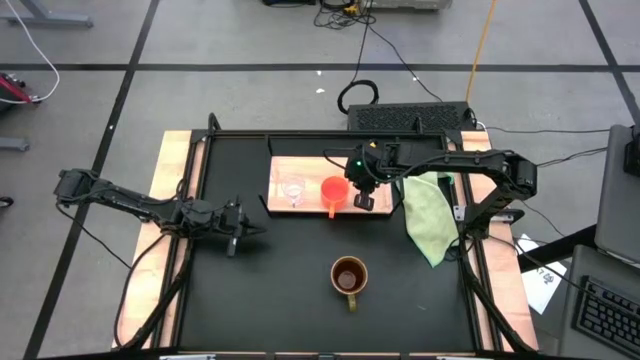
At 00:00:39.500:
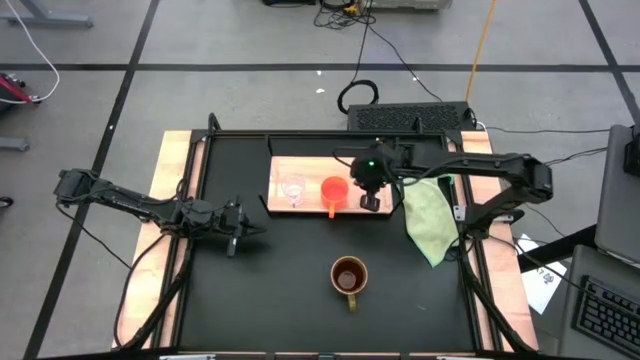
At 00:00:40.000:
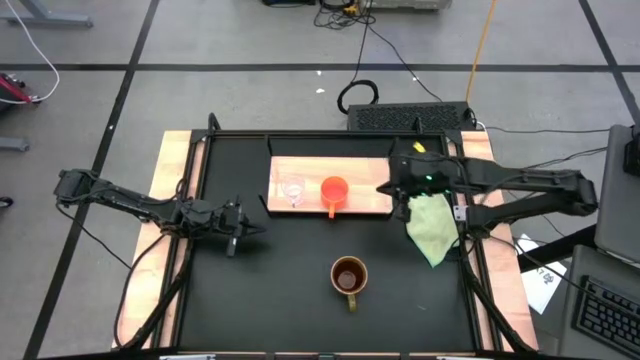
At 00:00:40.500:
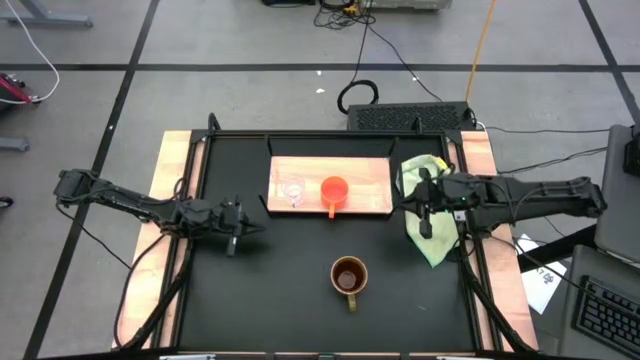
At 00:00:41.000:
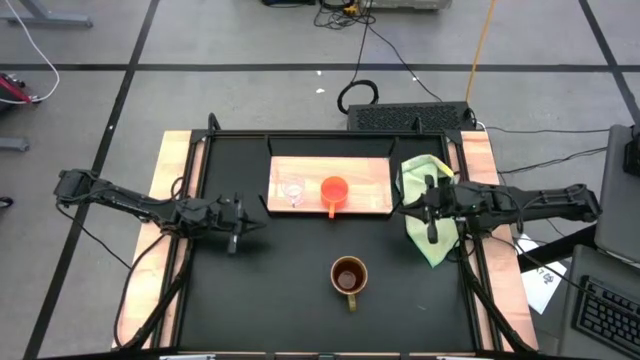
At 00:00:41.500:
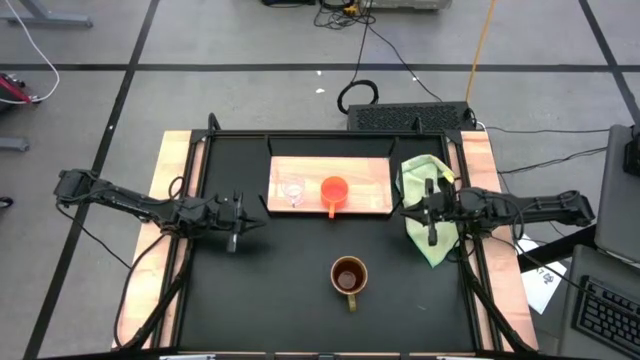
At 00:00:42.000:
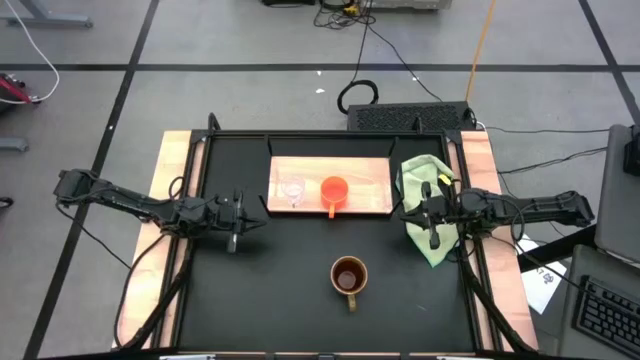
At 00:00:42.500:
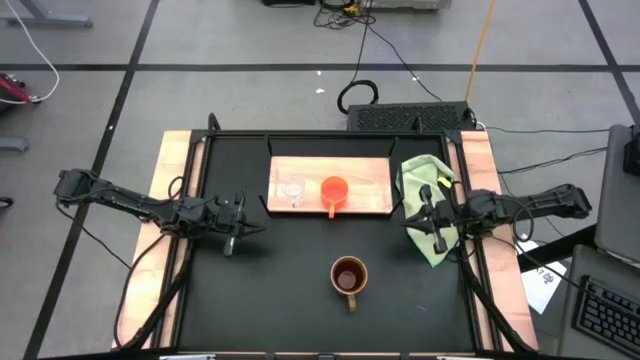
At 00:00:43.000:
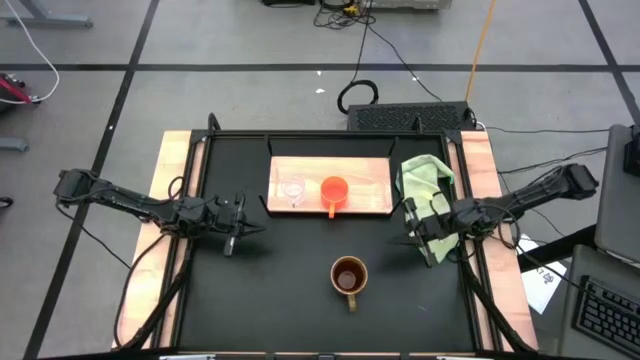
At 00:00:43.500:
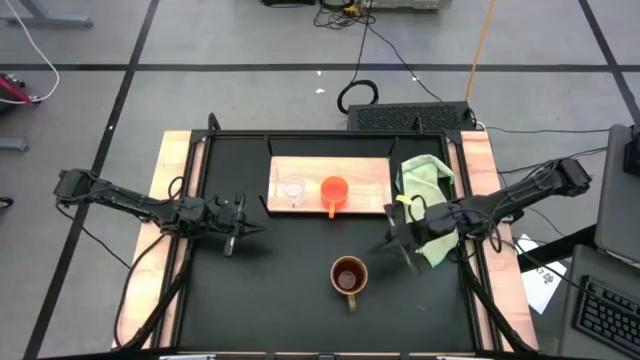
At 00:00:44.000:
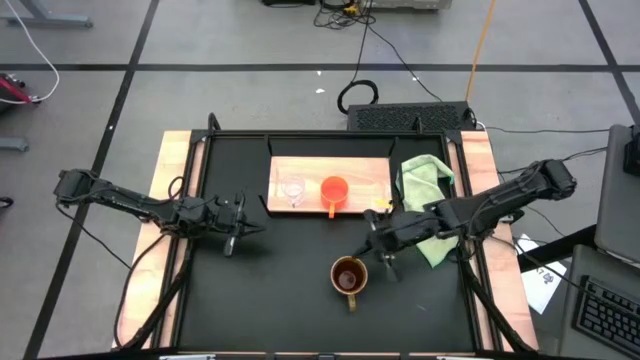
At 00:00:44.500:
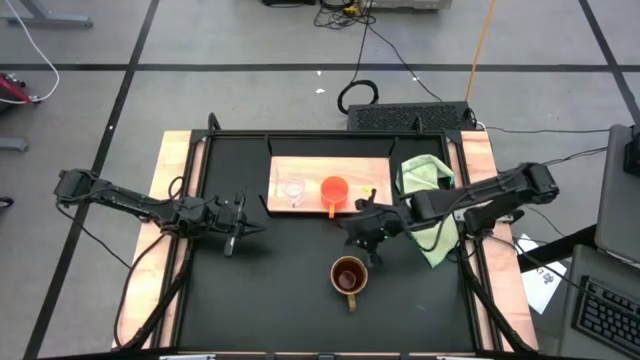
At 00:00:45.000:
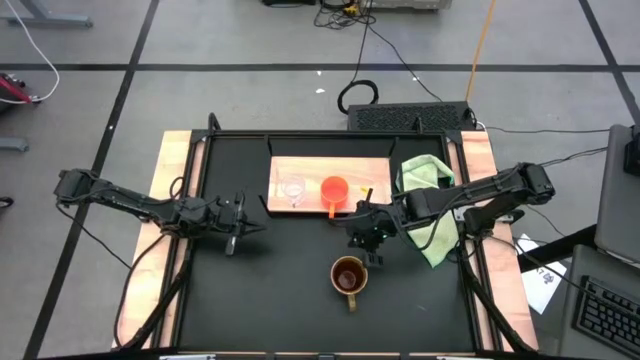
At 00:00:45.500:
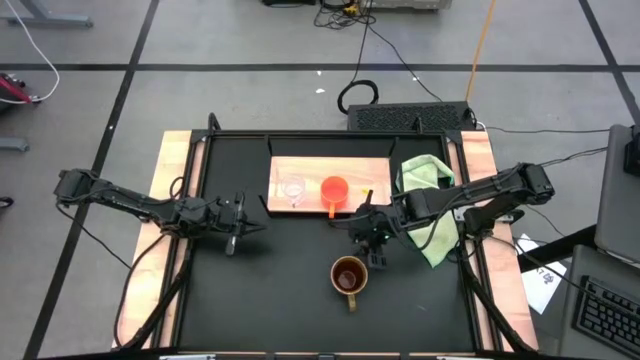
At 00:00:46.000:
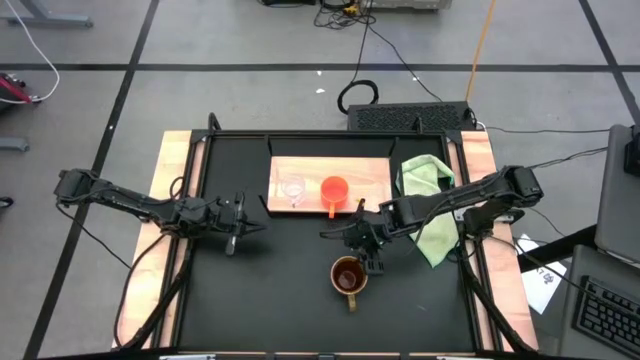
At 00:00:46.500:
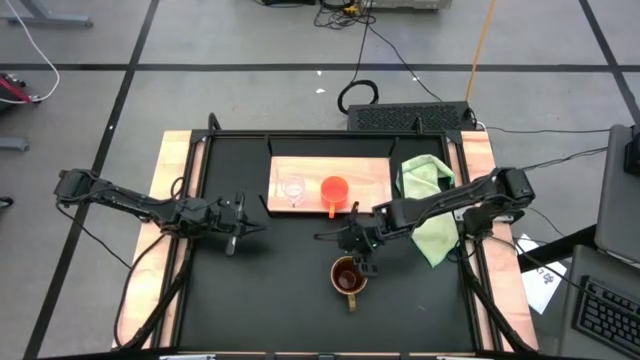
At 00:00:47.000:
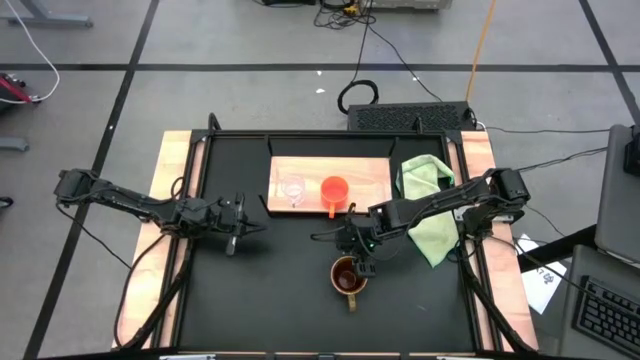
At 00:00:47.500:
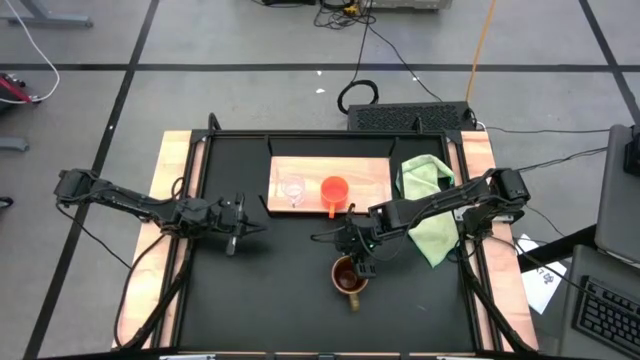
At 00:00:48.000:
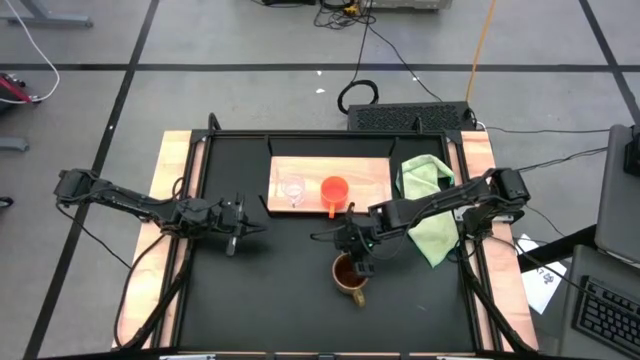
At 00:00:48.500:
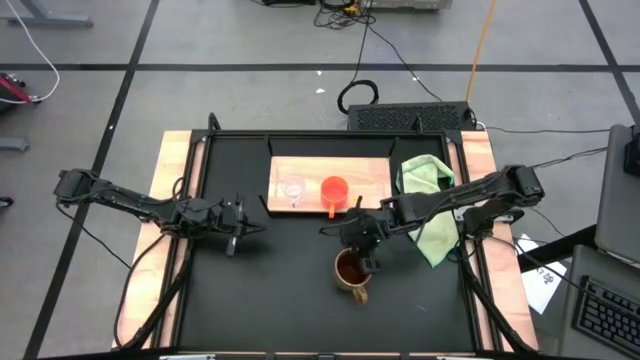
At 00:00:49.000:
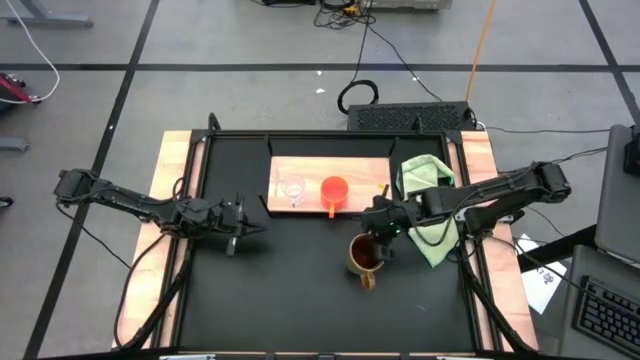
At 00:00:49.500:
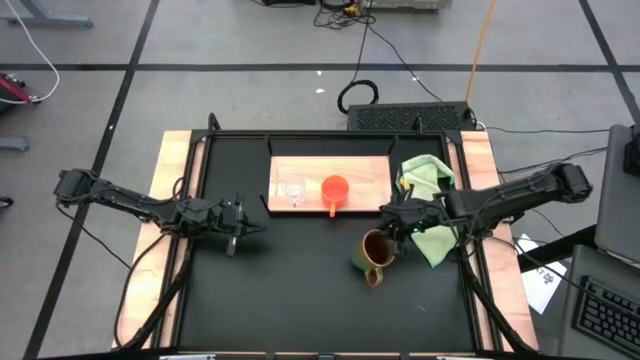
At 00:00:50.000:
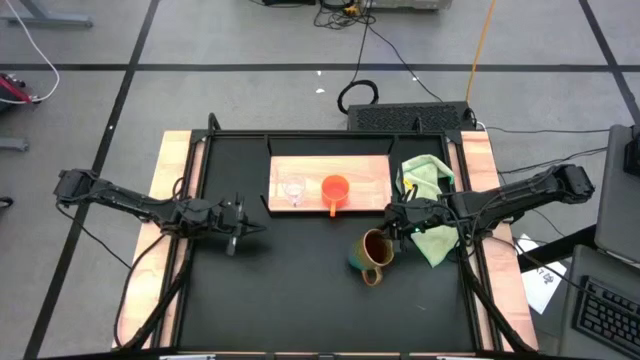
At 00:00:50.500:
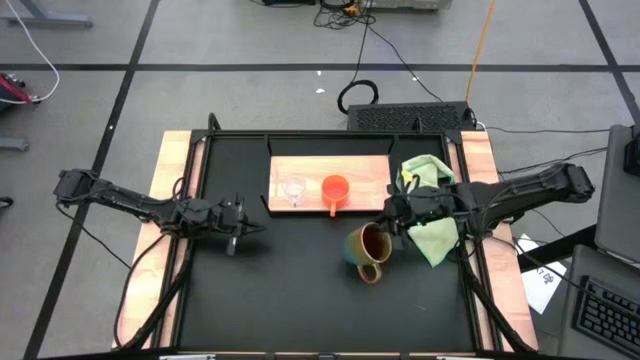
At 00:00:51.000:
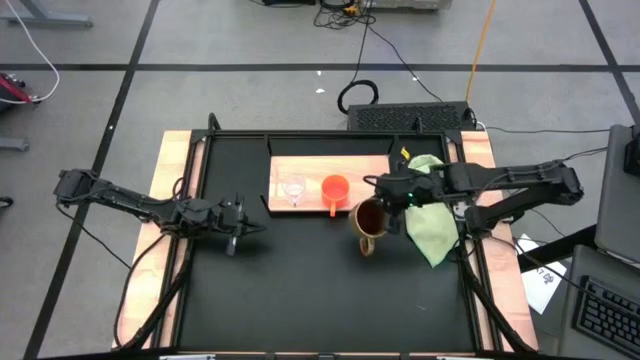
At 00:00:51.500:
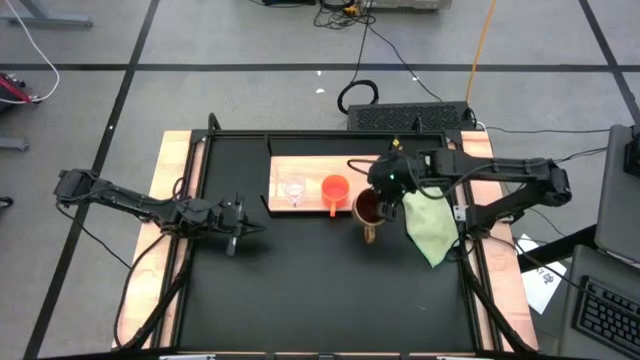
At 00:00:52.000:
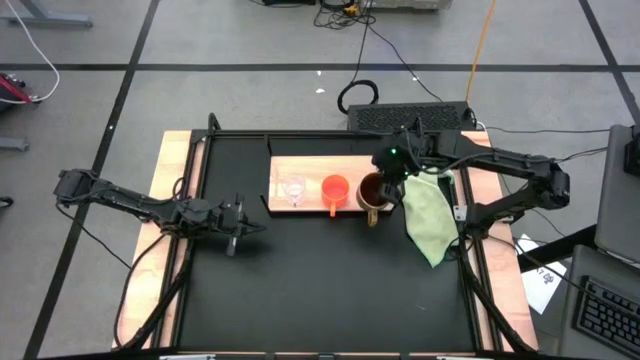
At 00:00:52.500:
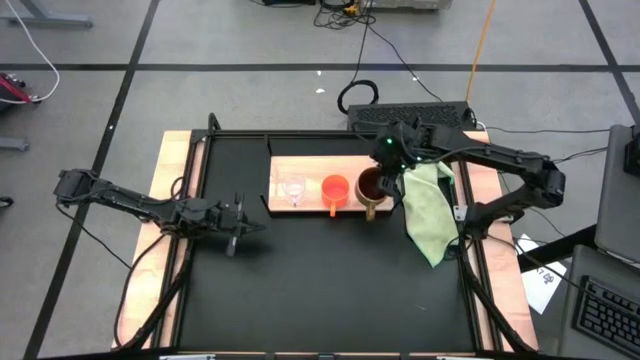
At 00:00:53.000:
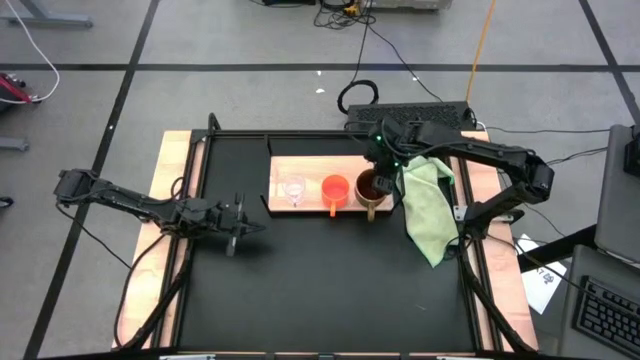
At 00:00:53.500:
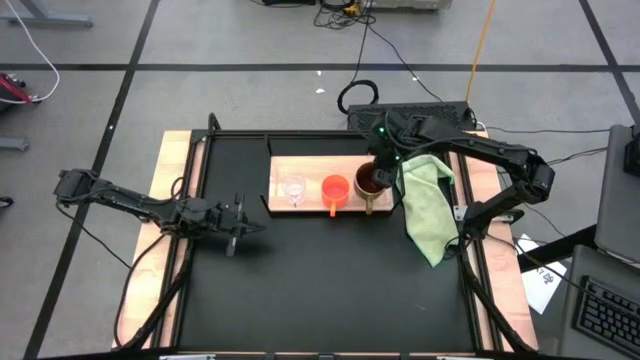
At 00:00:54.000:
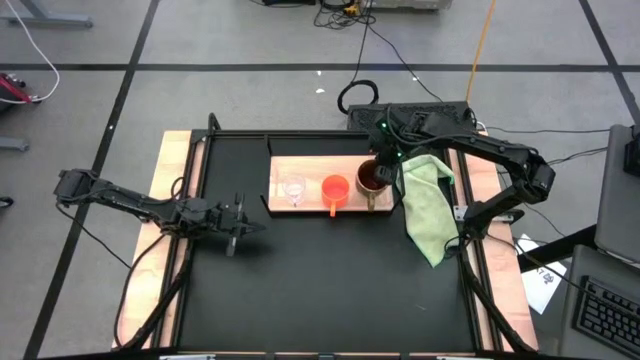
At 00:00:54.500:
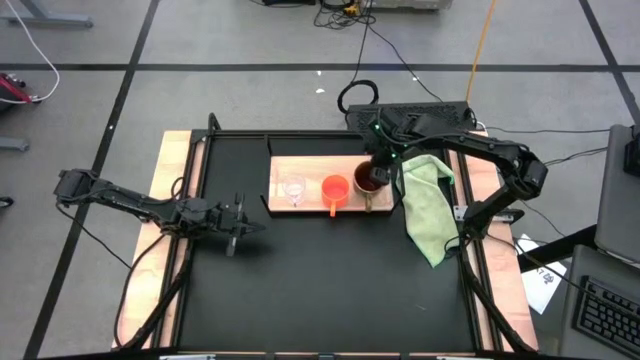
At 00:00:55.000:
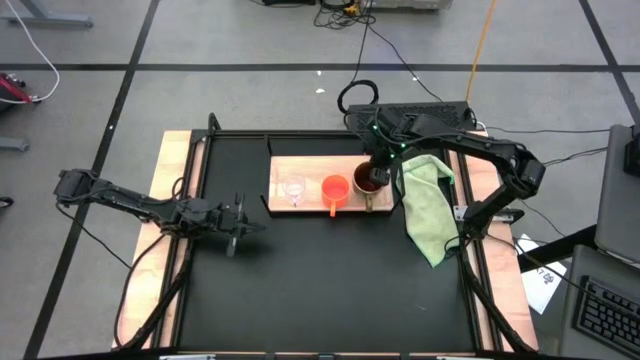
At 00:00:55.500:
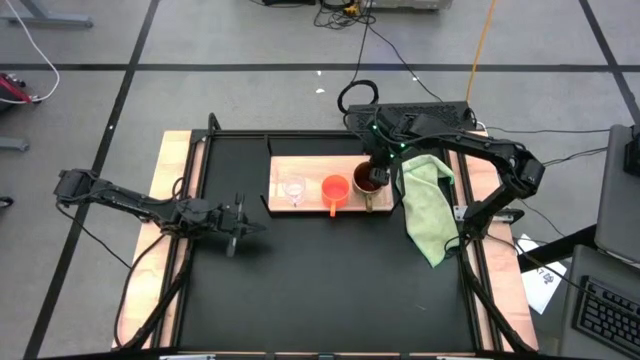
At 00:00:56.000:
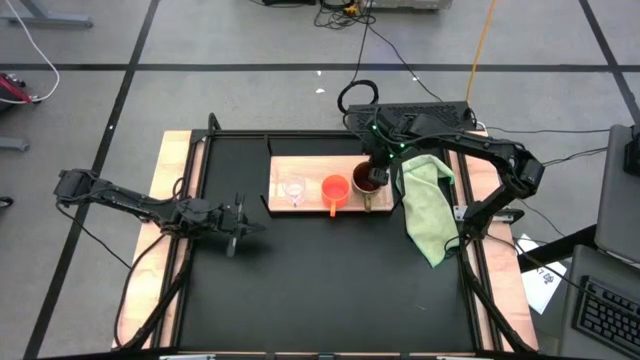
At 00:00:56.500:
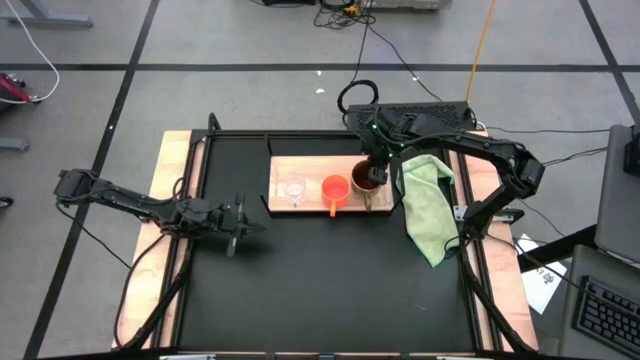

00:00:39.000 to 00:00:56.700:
Task: Stack small to large cups/mugs on shelf
Put the green mug on the shelf
